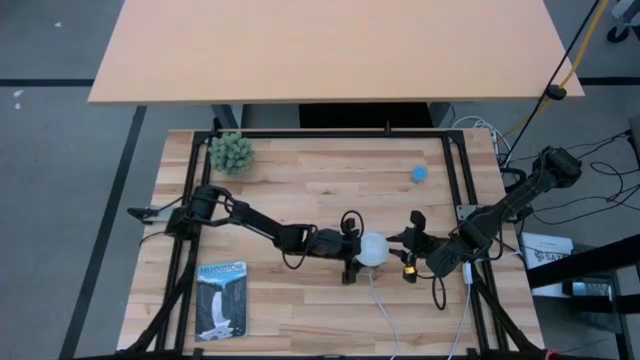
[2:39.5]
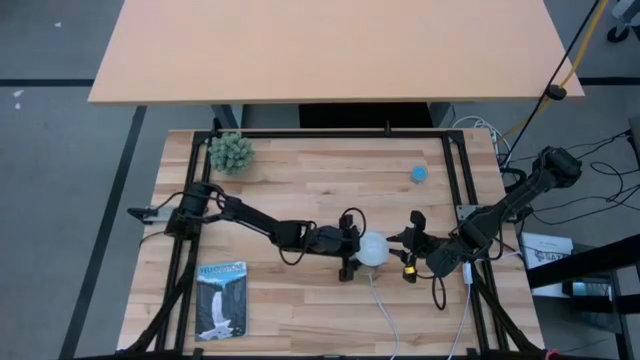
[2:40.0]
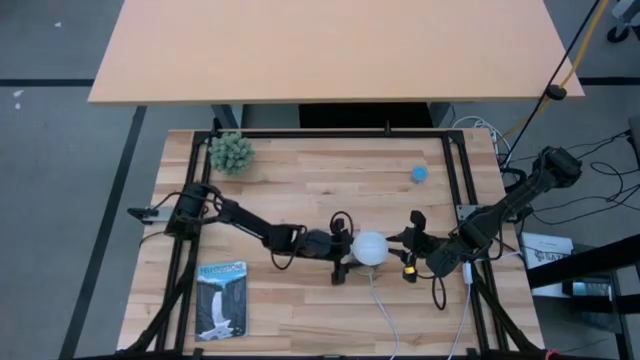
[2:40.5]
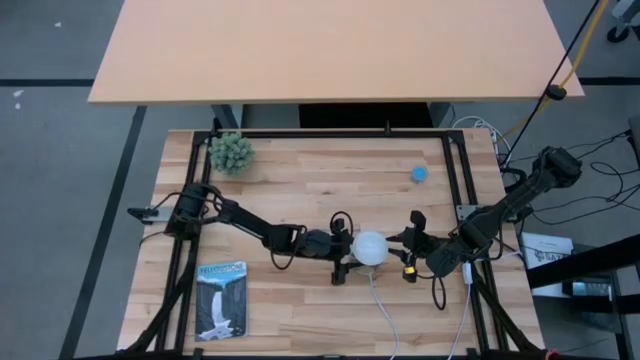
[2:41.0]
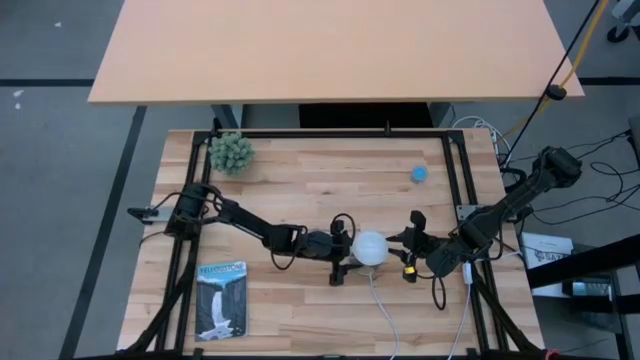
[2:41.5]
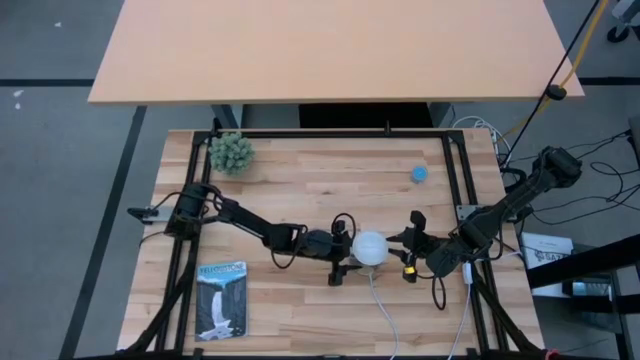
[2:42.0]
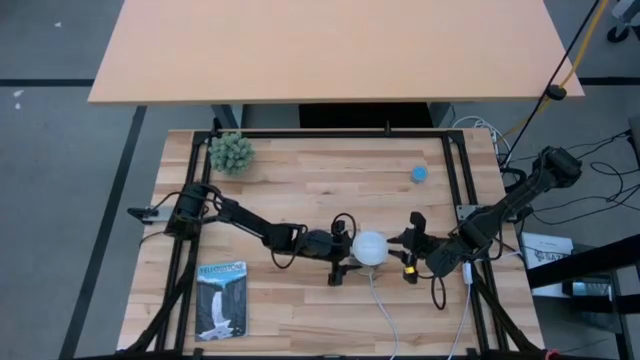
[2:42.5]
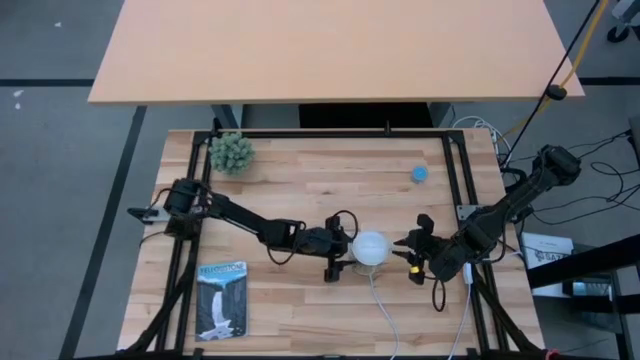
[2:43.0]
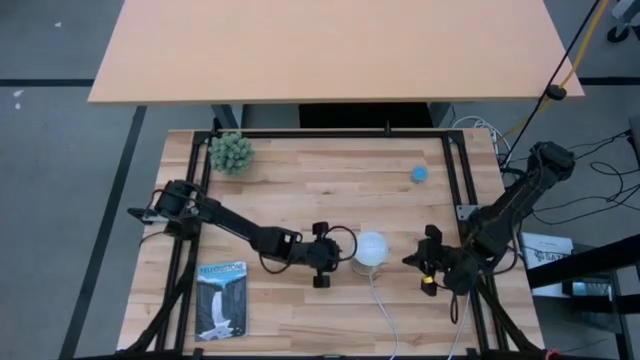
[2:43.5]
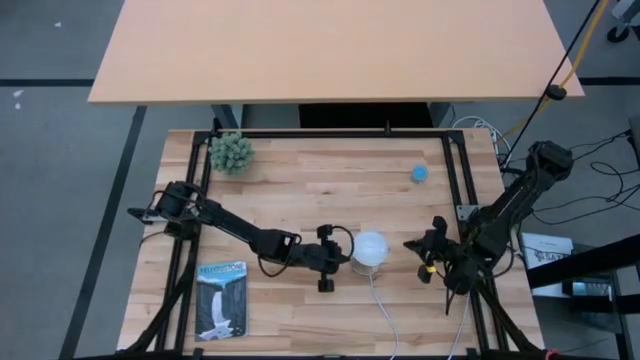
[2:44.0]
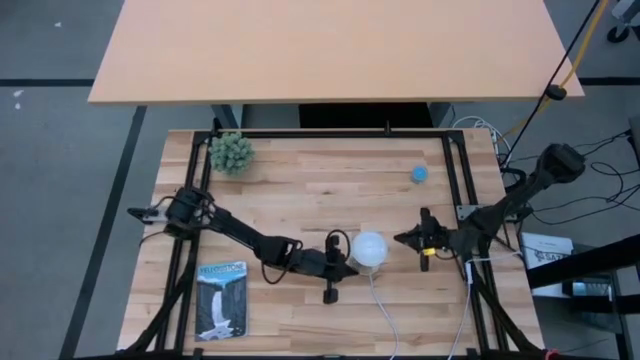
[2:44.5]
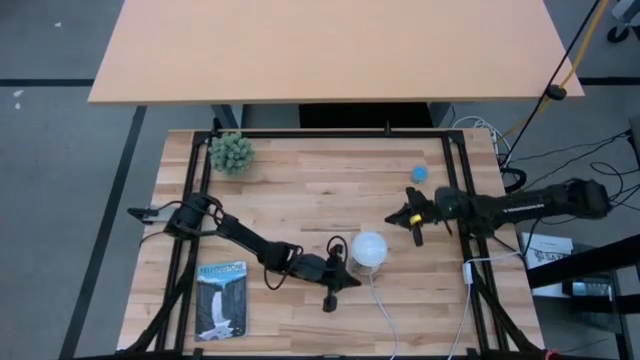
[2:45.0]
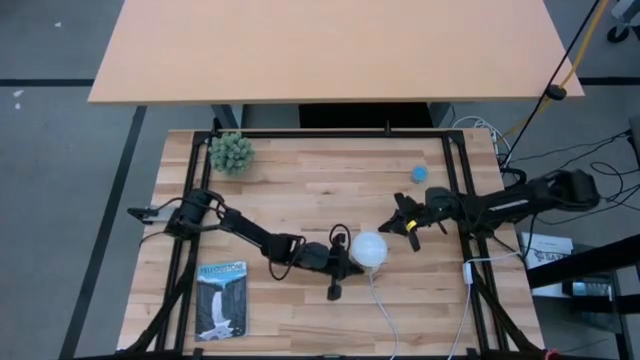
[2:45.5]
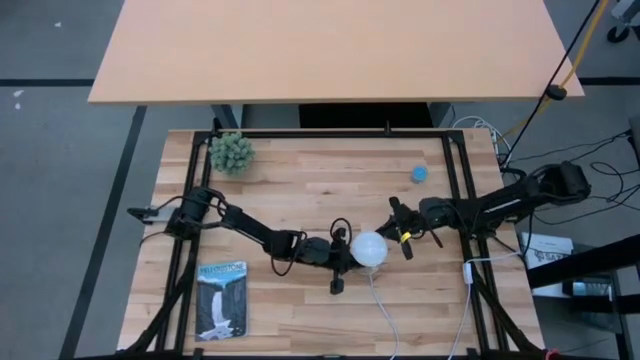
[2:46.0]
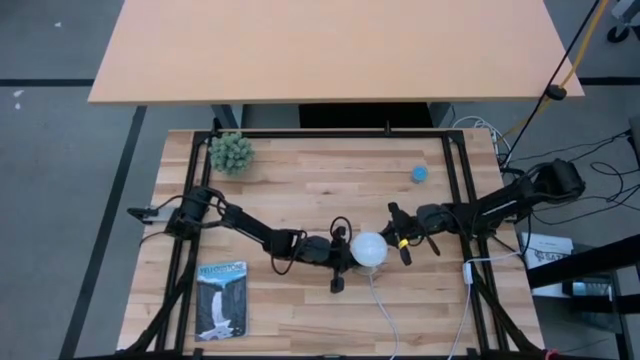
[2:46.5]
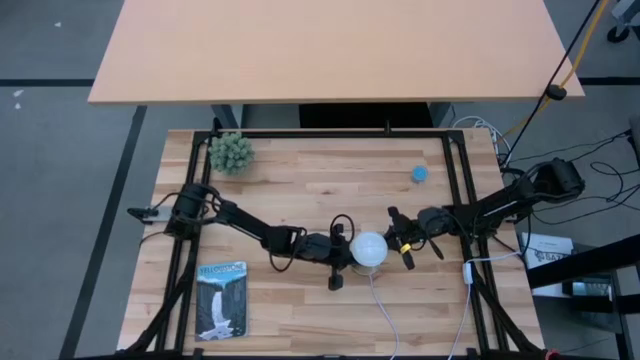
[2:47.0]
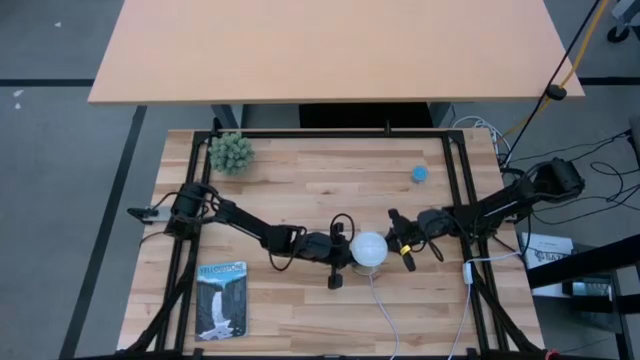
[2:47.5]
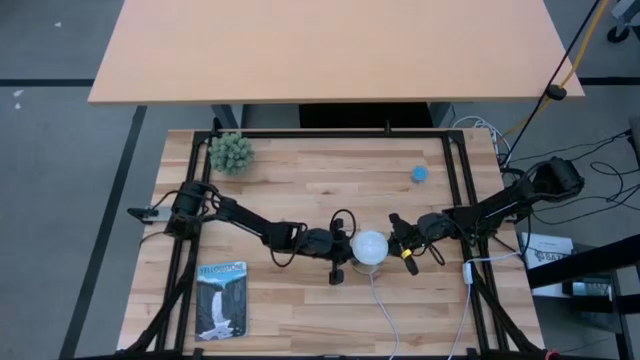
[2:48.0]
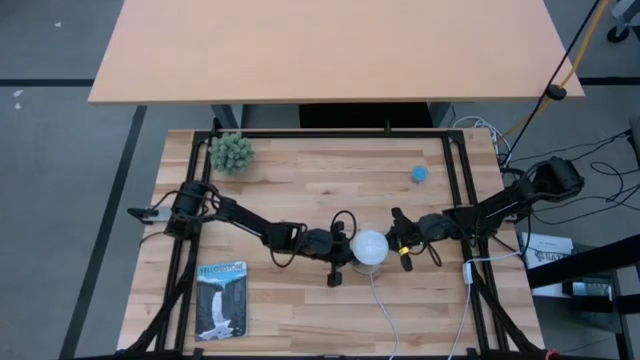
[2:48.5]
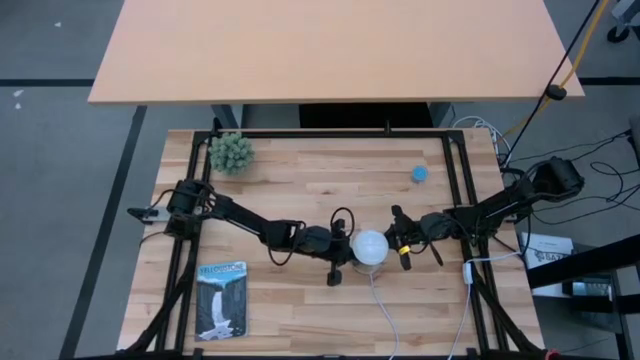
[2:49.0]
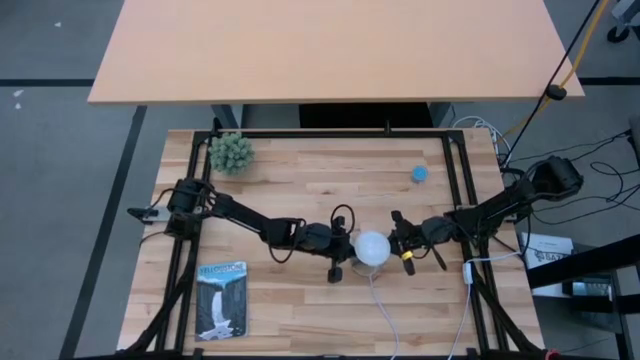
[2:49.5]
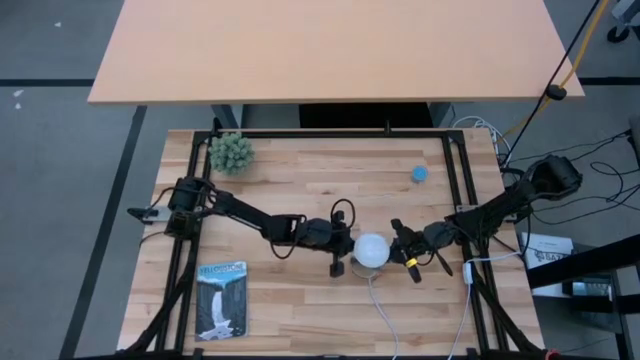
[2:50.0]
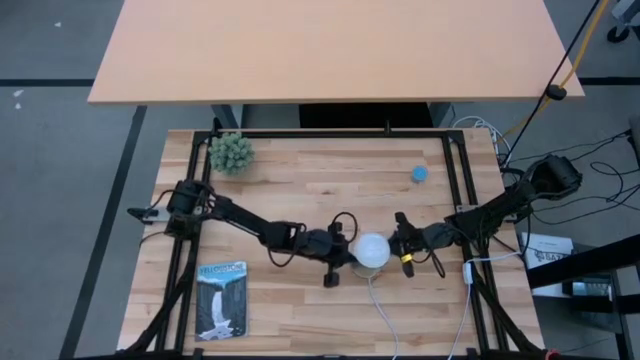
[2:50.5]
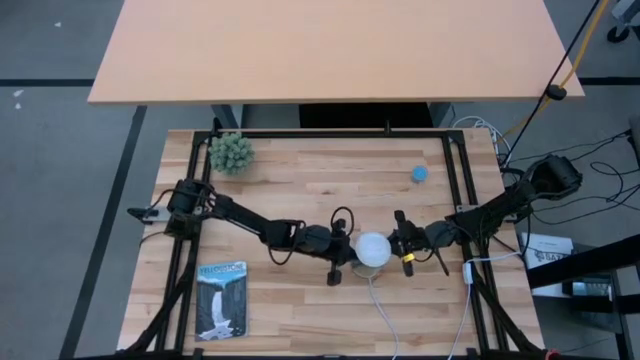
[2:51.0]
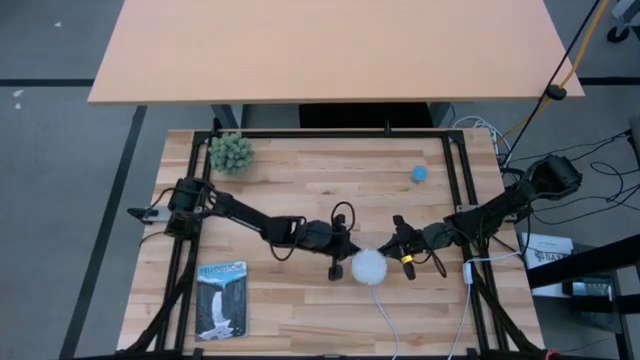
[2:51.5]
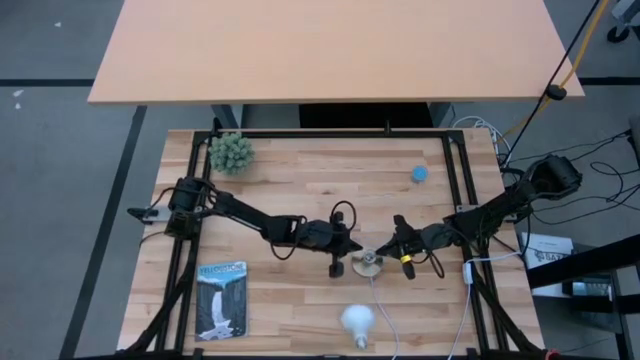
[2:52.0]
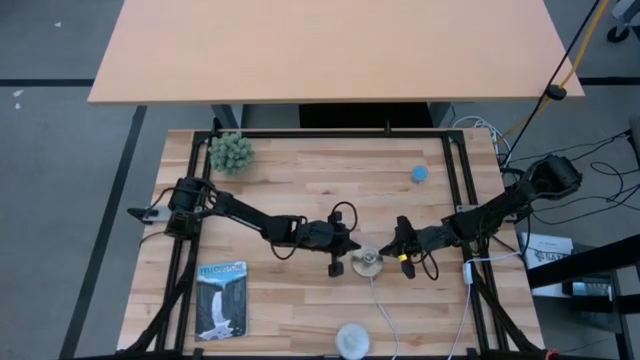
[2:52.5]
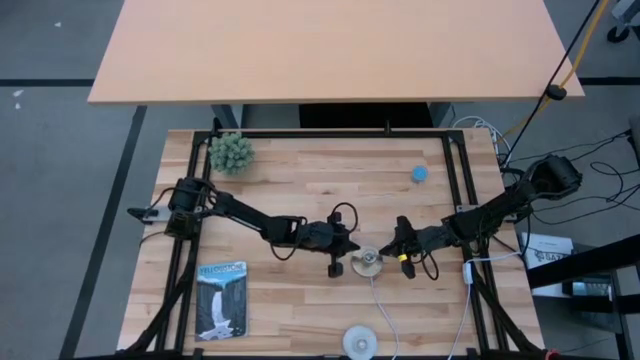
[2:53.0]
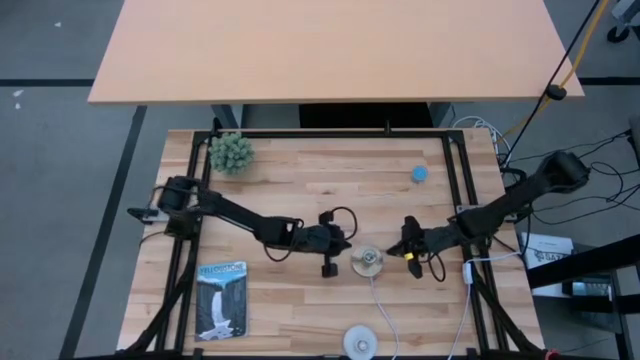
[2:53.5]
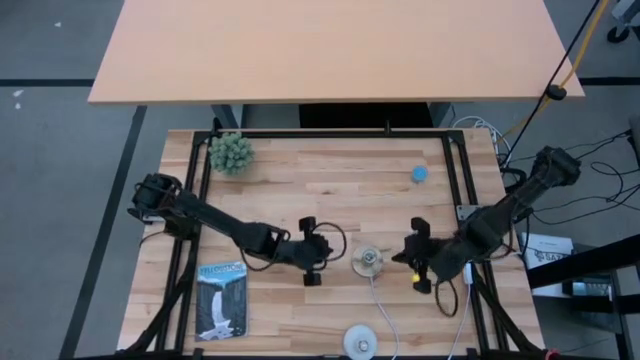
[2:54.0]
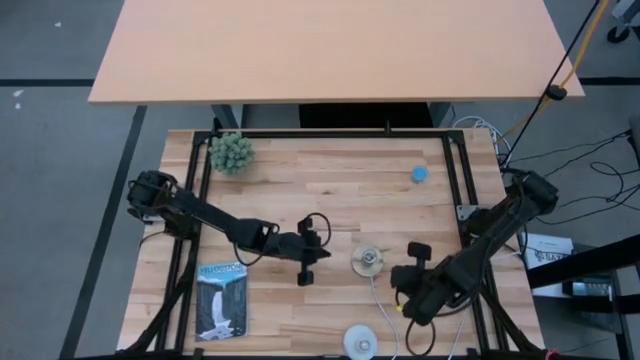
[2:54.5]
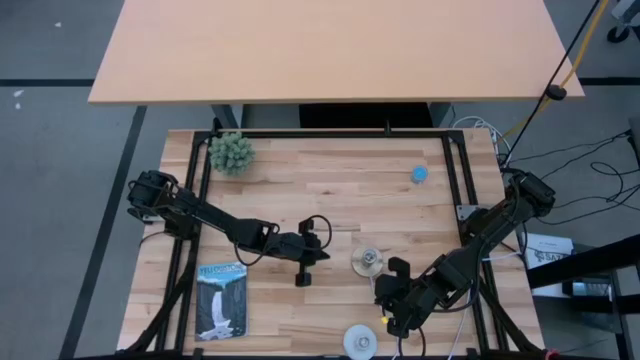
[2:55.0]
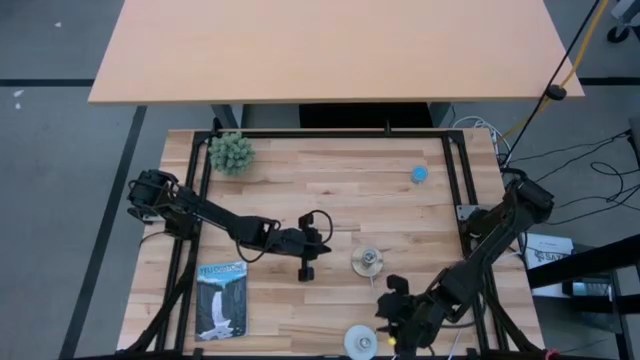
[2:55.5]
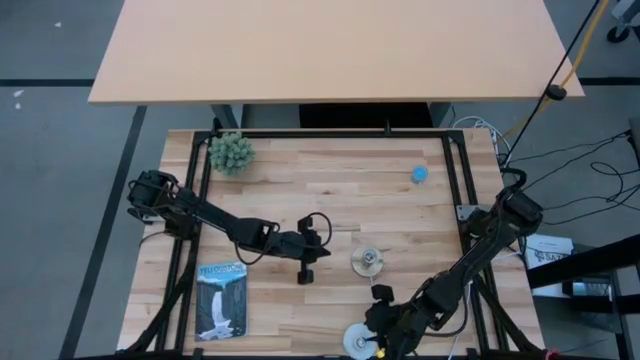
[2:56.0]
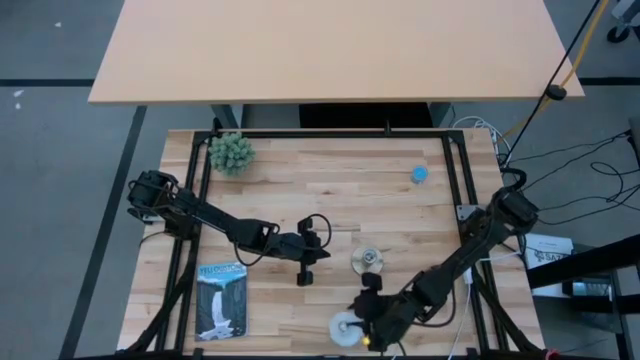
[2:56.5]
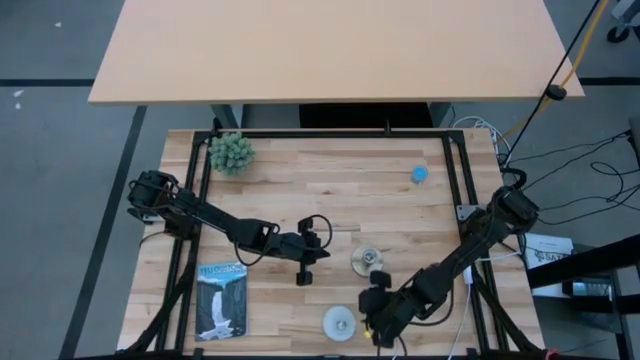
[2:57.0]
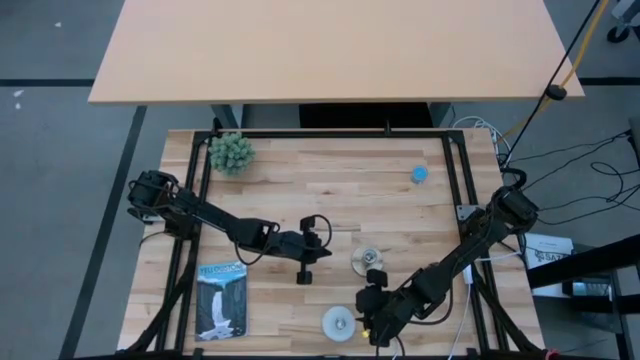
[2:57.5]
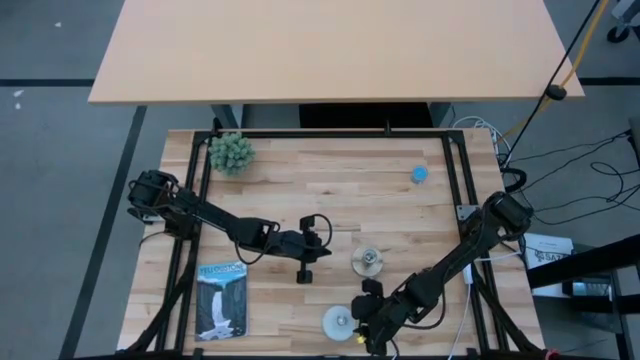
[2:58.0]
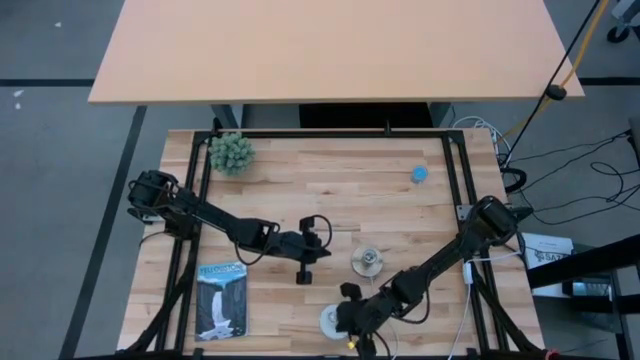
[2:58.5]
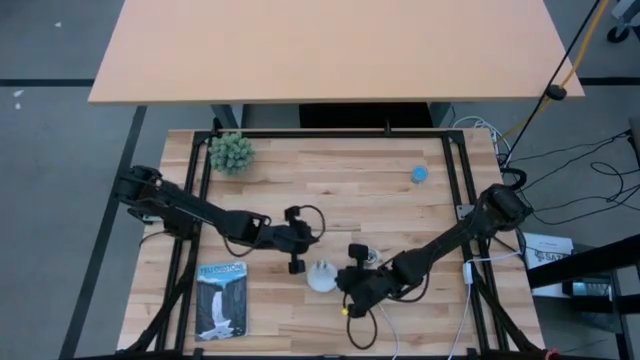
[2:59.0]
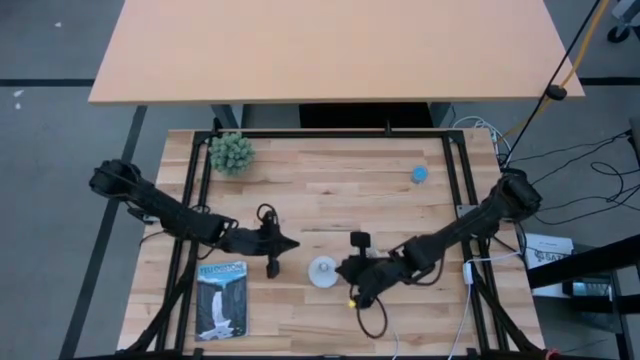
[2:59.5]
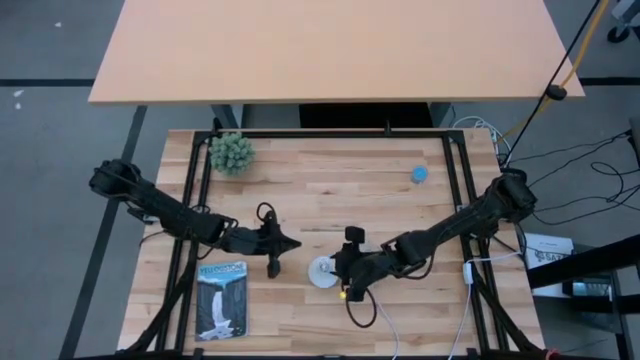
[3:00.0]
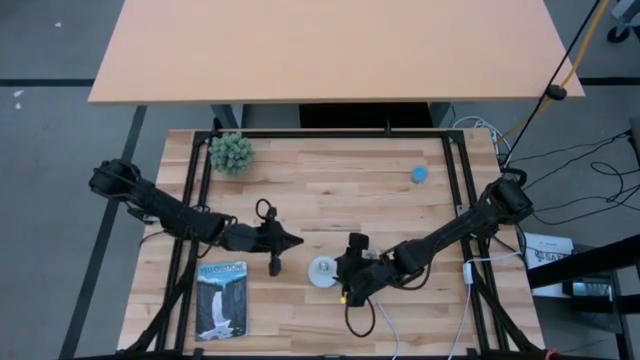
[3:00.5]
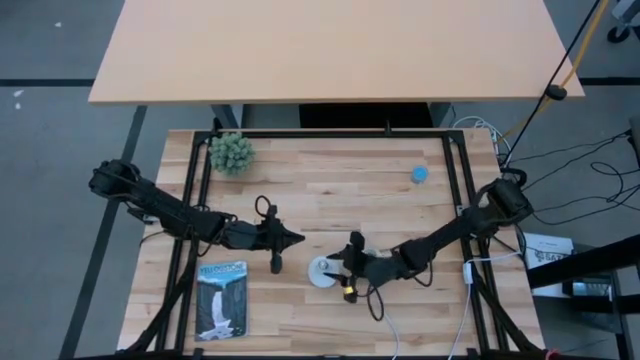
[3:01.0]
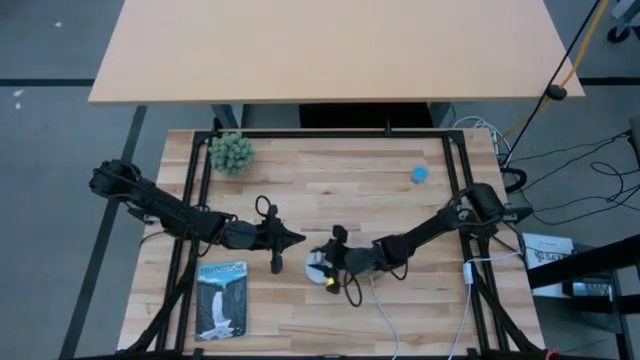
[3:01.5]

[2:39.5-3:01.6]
Task: Screw lightbulb
Insert the lightbulb into the desk lamp
